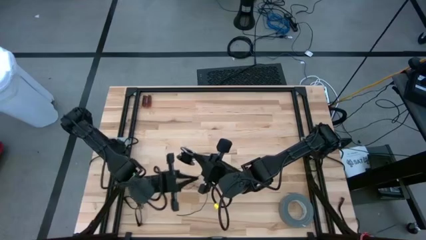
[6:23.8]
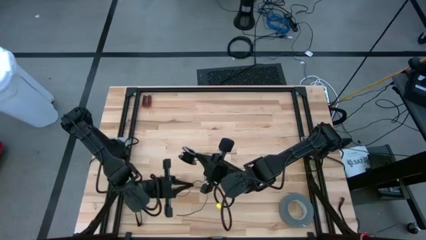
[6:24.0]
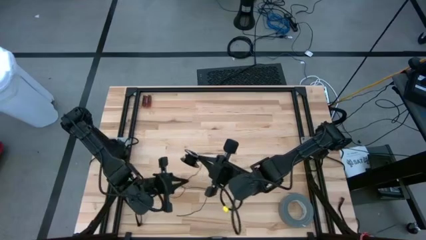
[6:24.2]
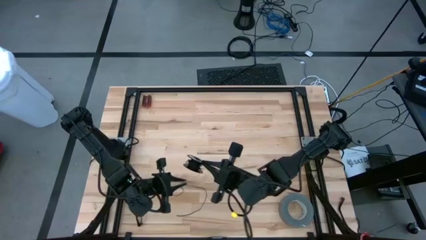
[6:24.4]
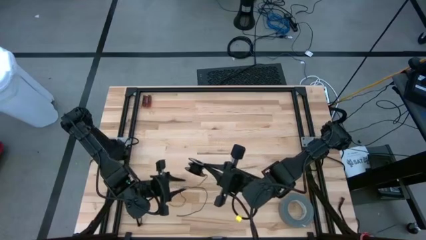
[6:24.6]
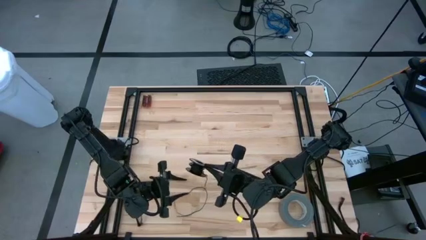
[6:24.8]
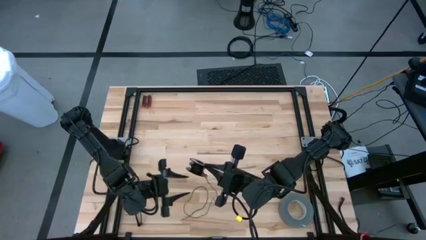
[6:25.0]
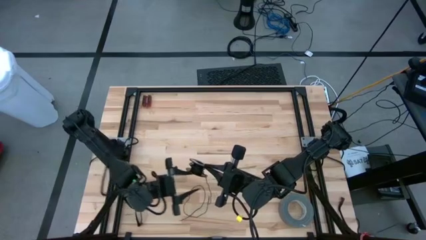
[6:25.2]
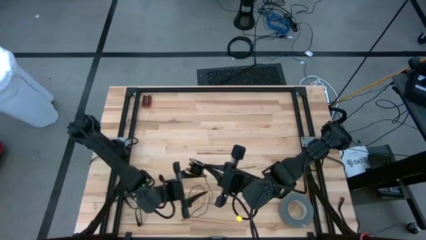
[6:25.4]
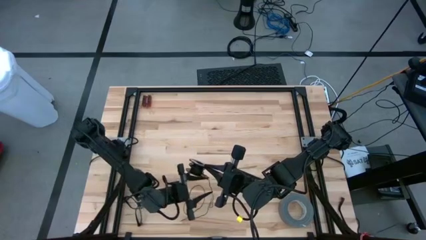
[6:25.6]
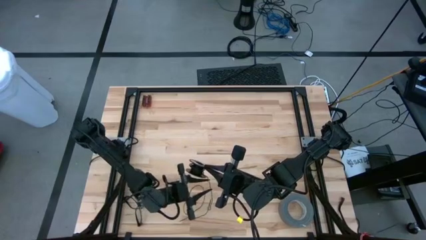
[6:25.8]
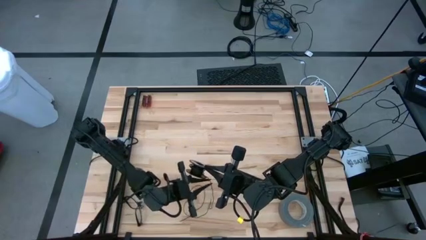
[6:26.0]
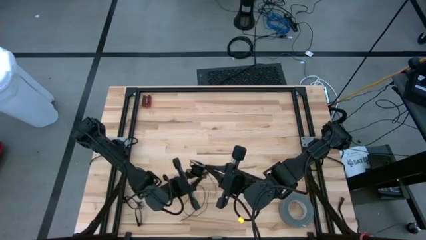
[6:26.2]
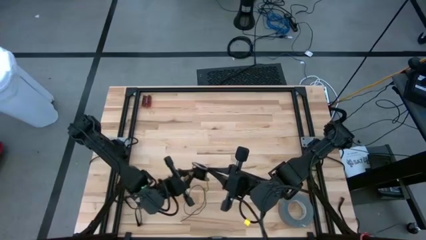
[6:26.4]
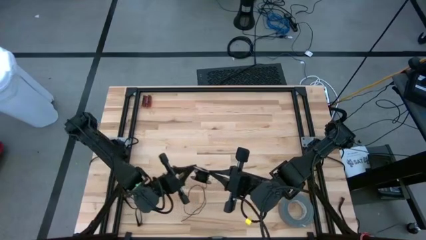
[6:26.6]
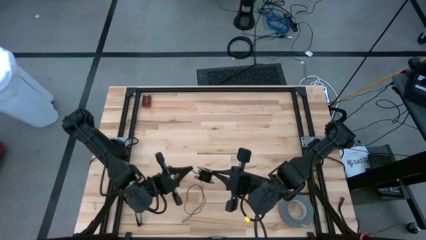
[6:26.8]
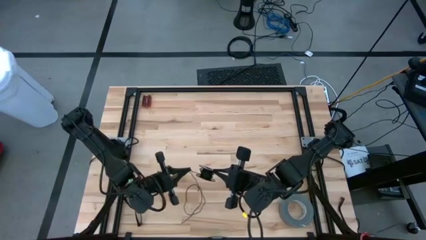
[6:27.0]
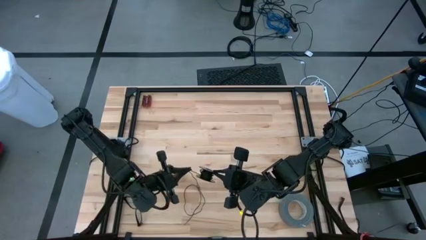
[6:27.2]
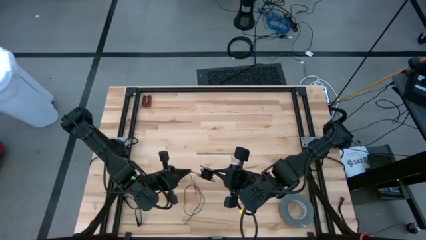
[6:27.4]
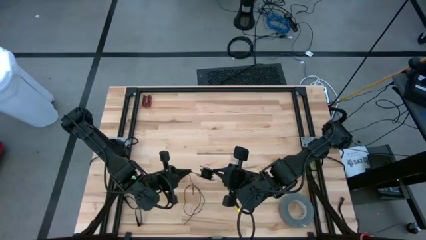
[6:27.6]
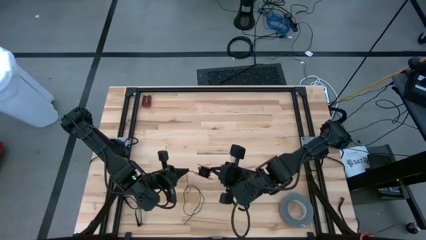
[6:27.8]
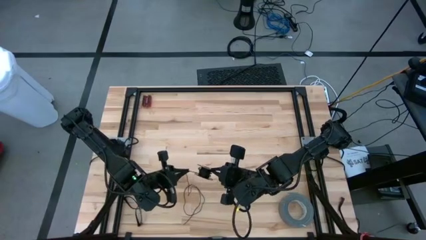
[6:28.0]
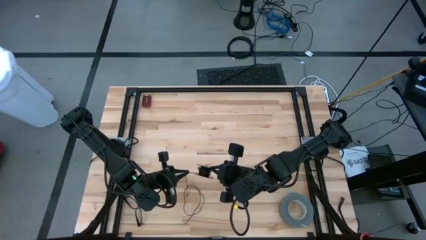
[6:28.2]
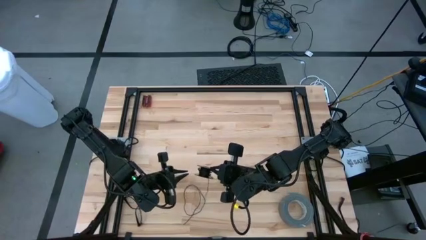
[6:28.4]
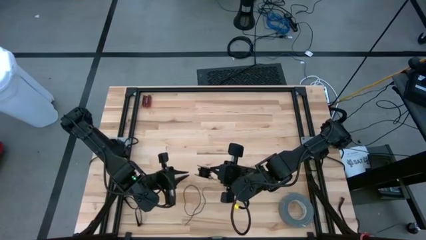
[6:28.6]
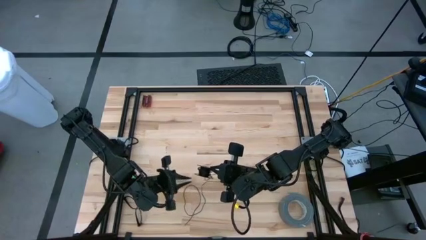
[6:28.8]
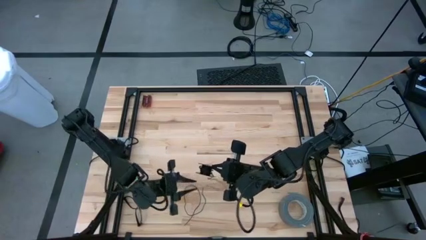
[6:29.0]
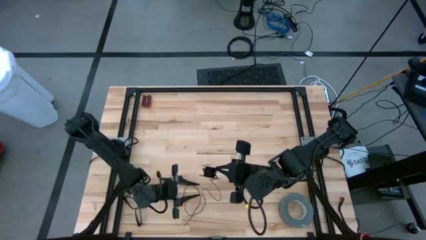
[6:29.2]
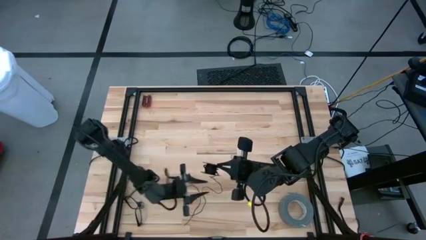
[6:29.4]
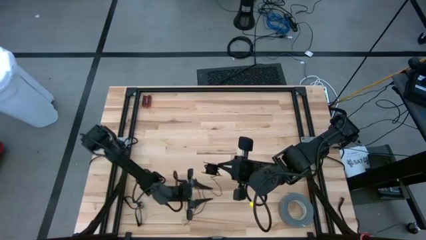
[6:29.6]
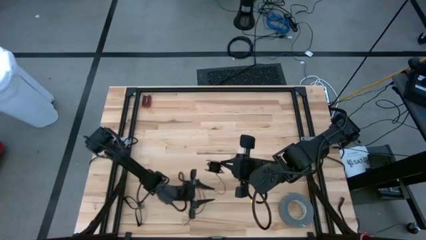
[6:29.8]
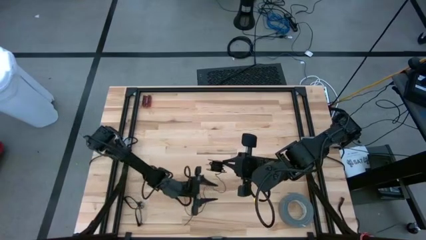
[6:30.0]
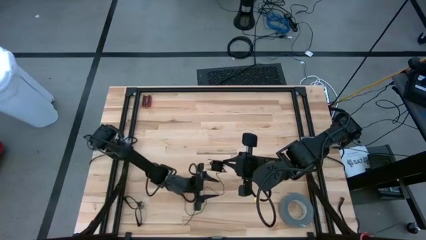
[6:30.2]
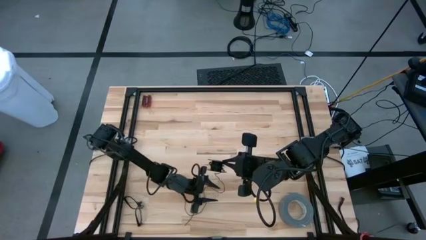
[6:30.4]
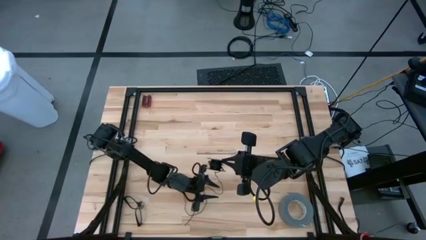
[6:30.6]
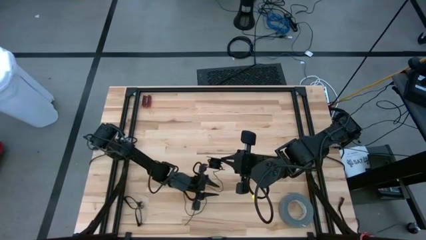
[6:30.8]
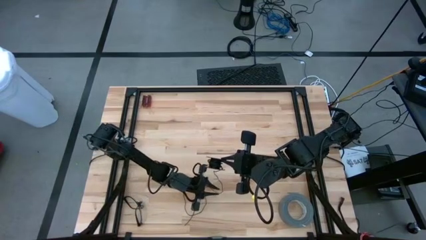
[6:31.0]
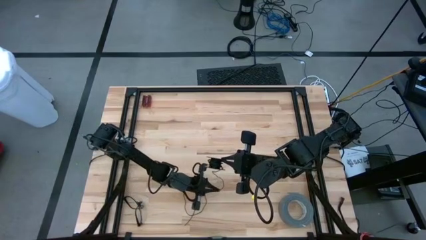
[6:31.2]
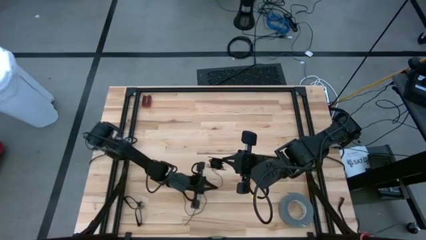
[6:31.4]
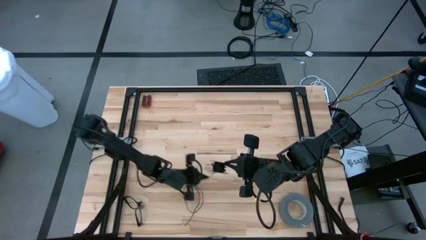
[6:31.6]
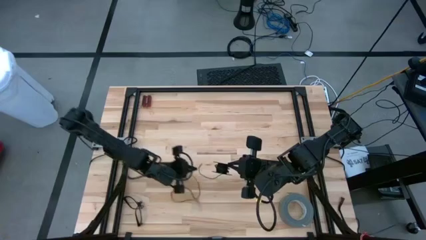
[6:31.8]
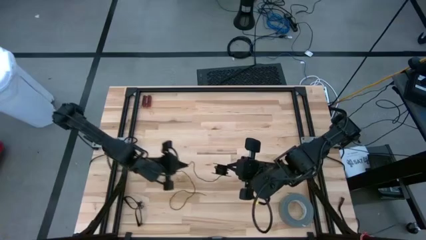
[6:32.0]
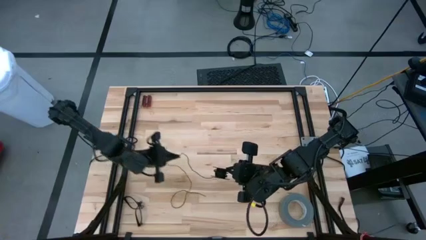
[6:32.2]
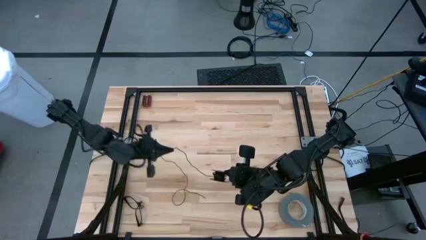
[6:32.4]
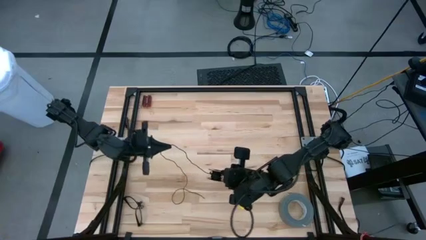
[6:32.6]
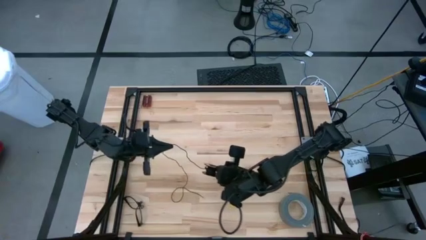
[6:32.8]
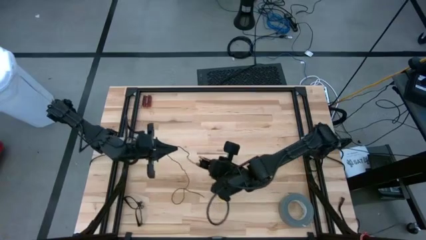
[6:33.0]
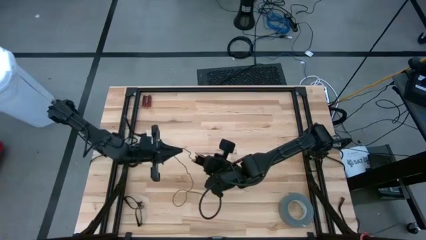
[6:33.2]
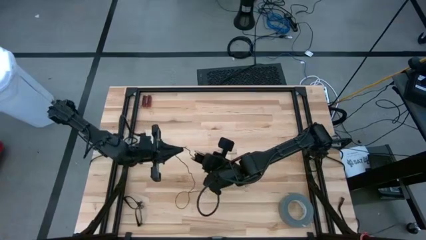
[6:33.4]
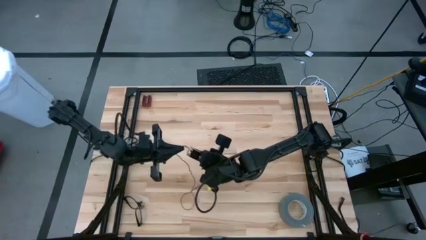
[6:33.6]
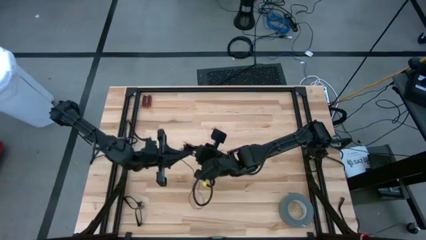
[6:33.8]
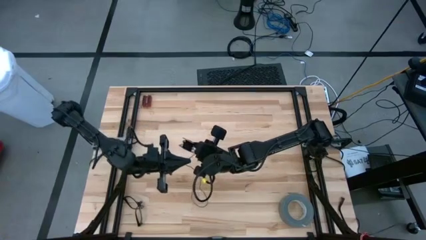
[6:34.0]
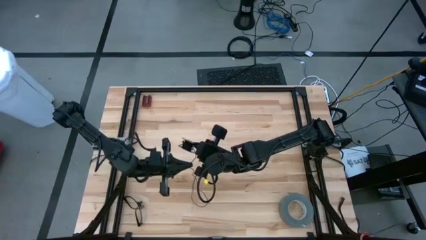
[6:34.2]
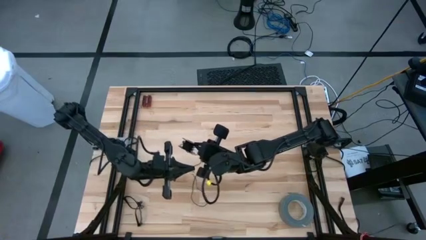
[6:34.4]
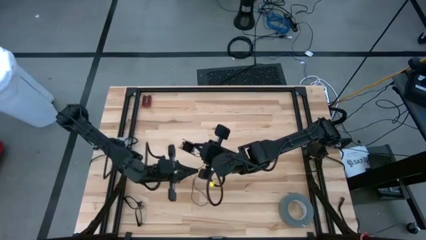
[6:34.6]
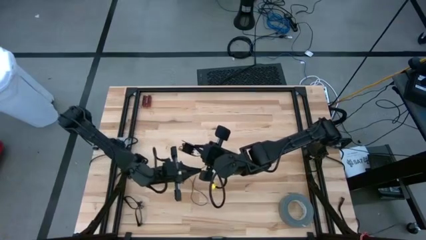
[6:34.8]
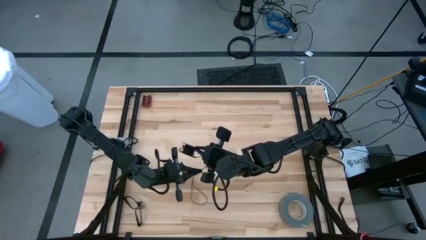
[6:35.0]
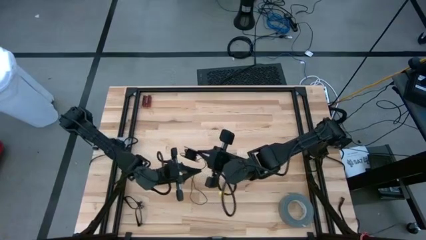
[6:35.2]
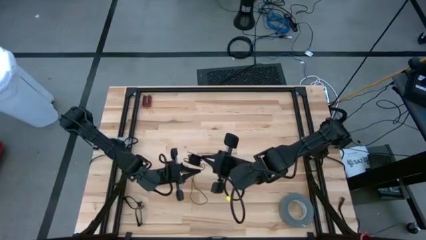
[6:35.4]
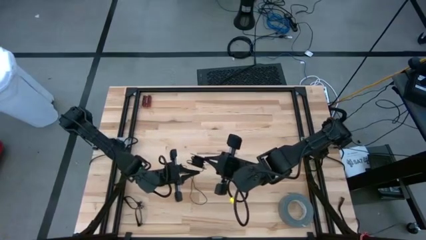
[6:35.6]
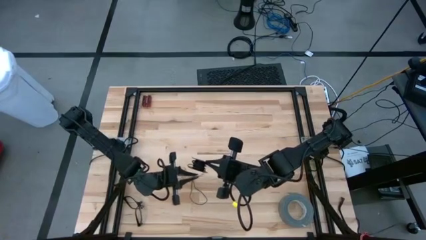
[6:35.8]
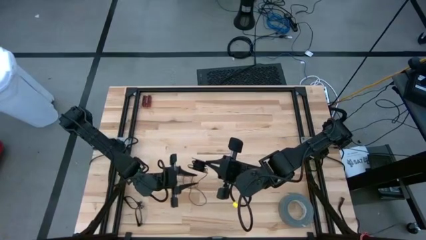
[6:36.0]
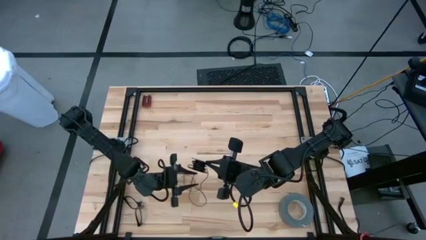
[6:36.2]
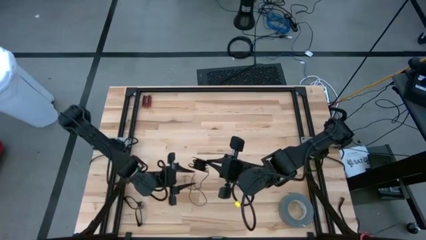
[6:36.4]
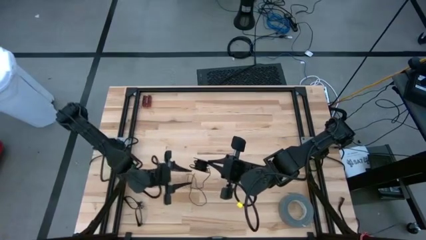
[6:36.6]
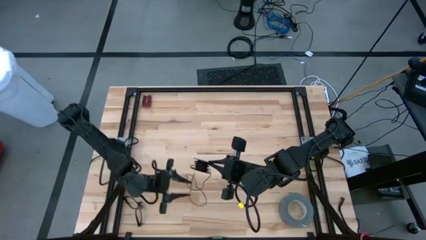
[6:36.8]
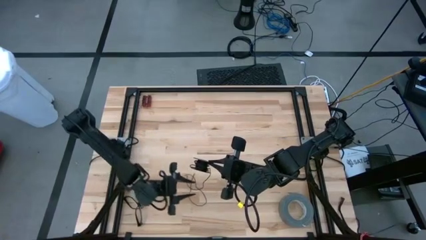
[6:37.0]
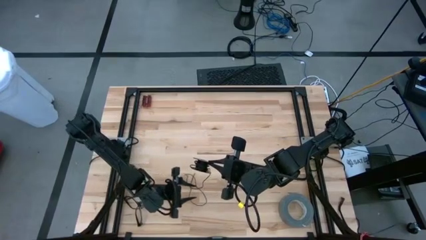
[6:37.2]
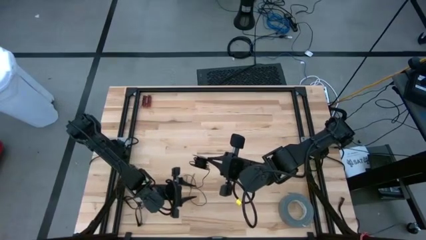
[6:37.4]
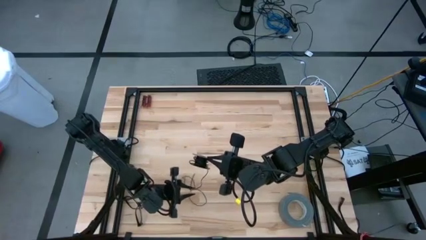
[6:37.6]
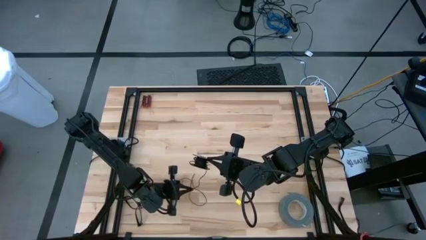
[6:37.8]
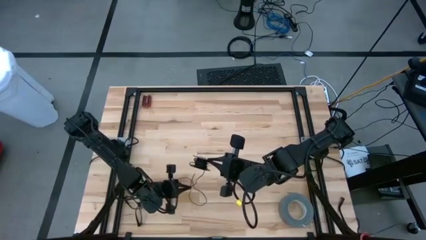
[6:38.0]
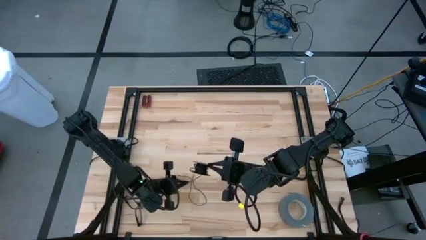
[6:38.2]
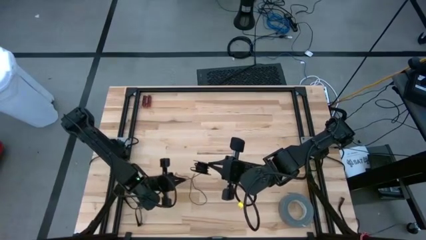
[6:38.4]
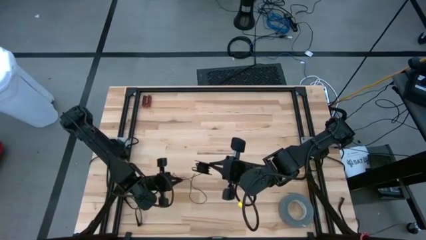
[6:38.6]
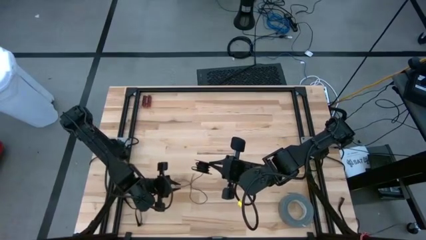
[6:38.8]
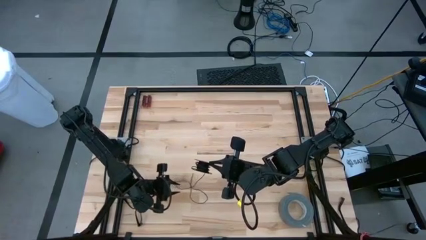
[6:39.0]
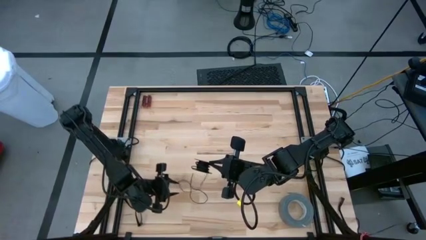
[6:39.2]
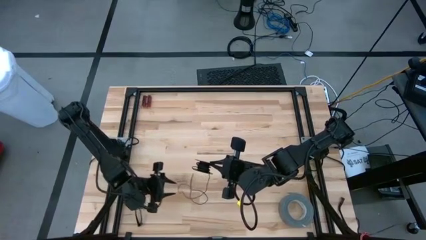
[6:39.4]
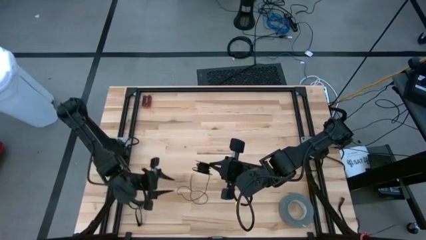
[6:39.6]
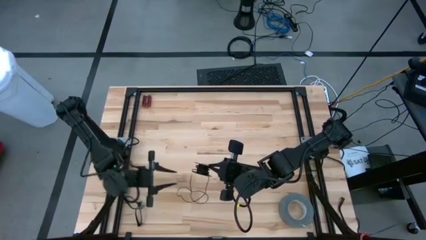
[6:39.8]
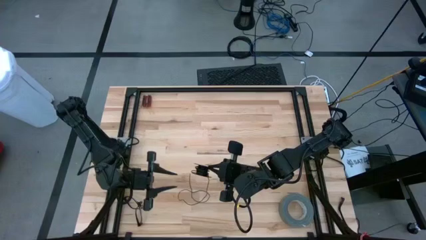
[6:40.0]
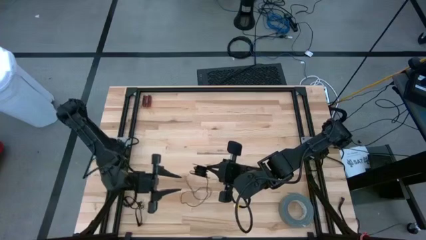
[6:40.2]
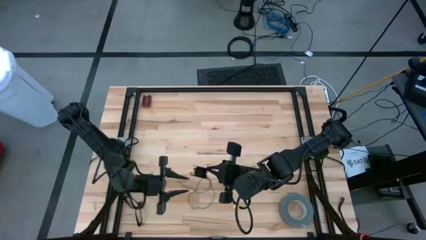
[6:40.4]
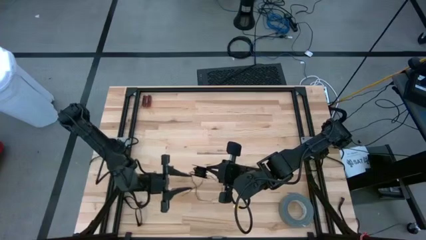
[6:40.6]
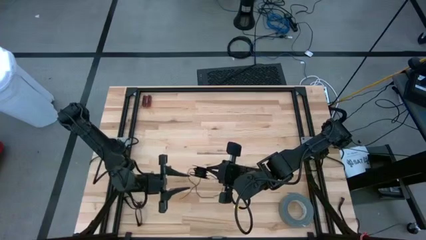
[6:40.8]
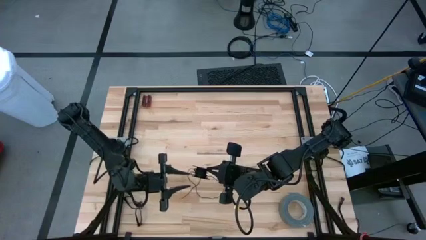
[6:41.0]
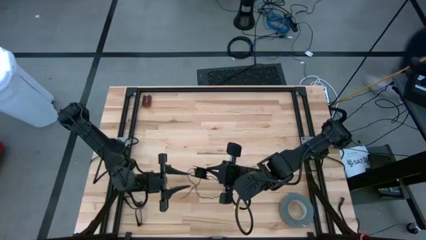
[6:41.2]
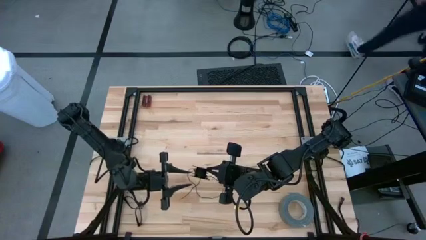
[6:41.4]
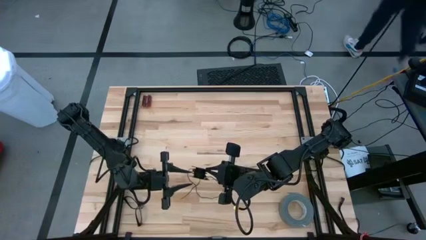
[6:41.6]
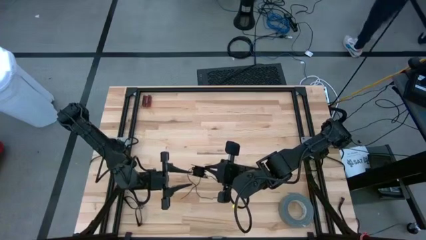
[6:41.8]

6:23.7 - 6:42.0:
Task: Coil cords
Coil the black wire on the spool
